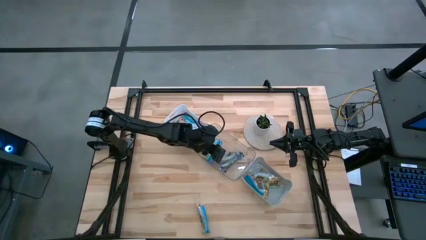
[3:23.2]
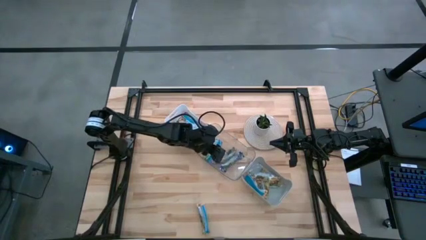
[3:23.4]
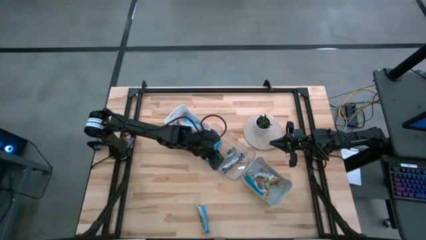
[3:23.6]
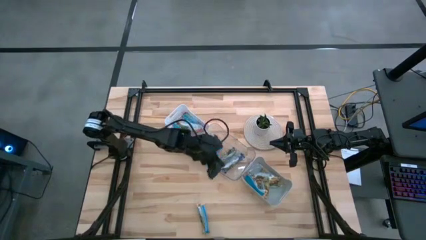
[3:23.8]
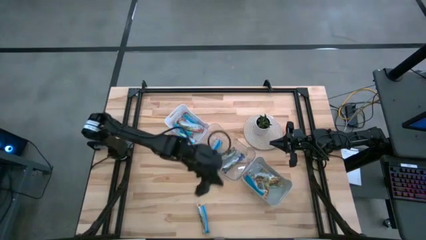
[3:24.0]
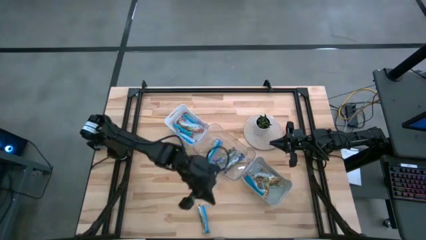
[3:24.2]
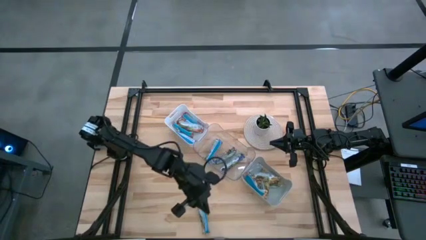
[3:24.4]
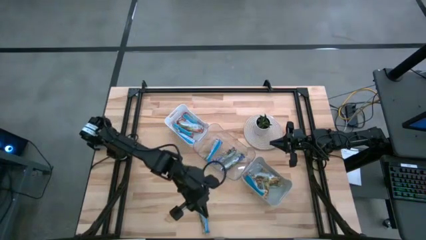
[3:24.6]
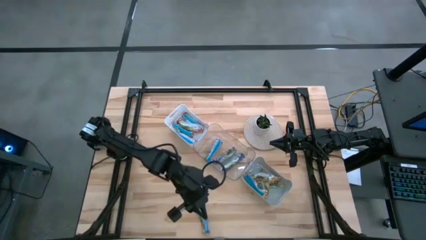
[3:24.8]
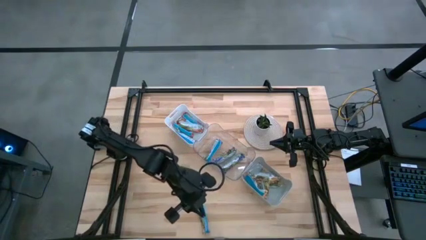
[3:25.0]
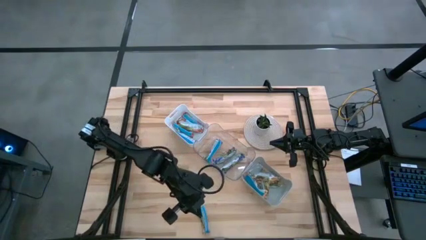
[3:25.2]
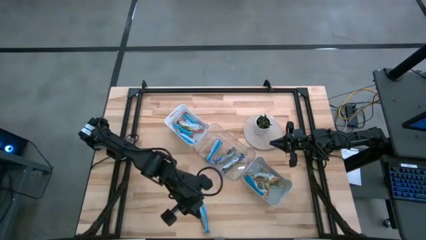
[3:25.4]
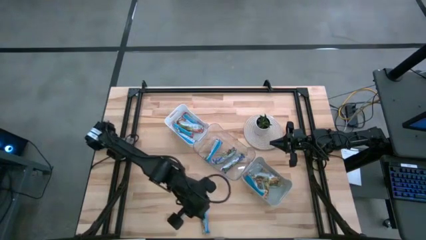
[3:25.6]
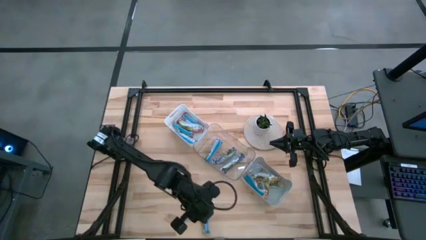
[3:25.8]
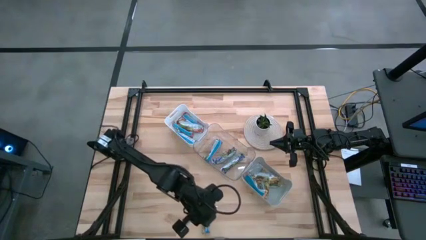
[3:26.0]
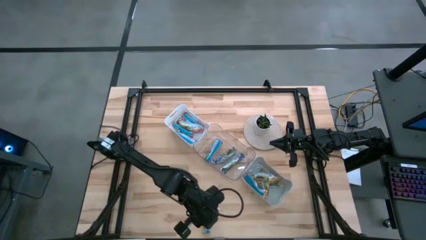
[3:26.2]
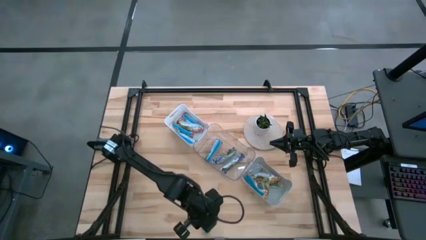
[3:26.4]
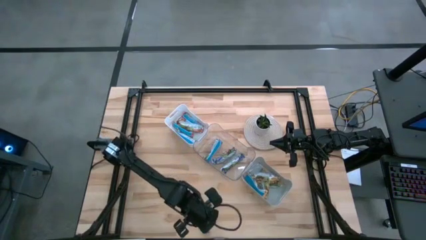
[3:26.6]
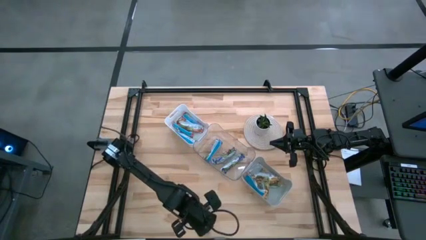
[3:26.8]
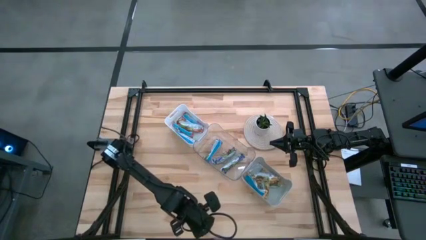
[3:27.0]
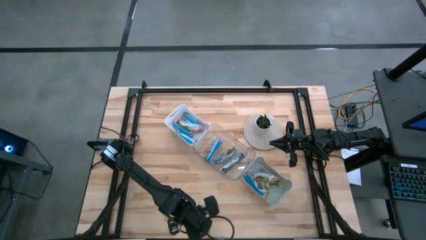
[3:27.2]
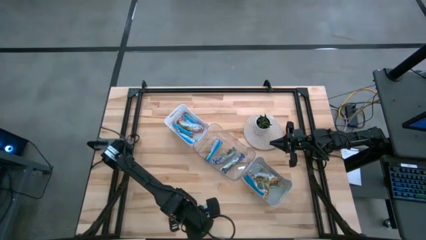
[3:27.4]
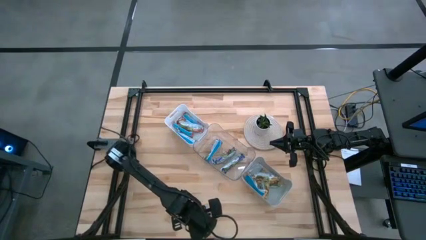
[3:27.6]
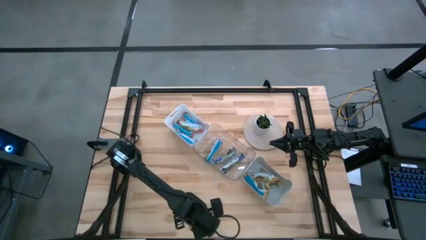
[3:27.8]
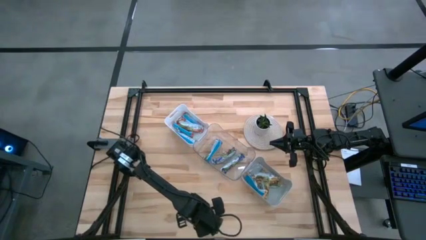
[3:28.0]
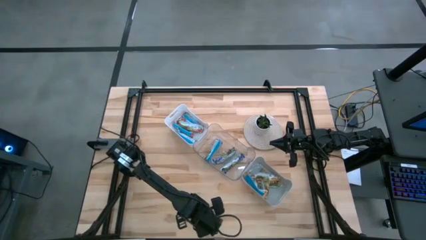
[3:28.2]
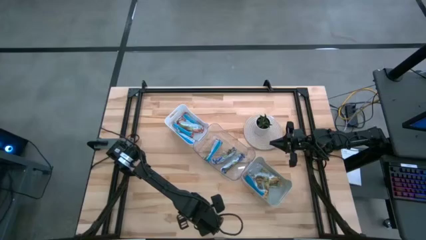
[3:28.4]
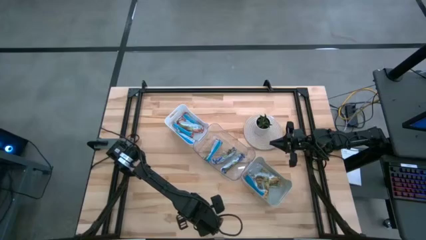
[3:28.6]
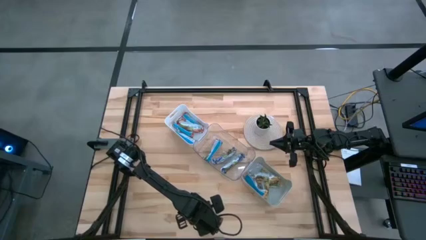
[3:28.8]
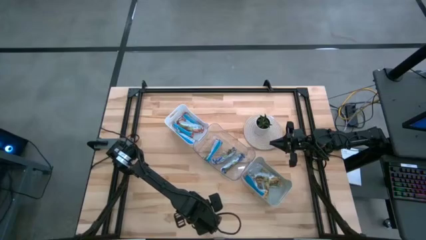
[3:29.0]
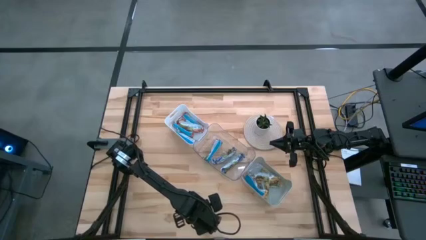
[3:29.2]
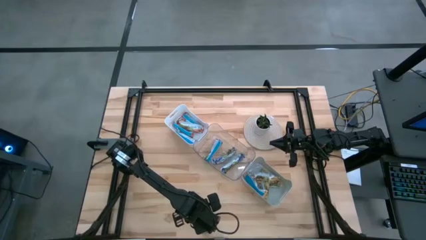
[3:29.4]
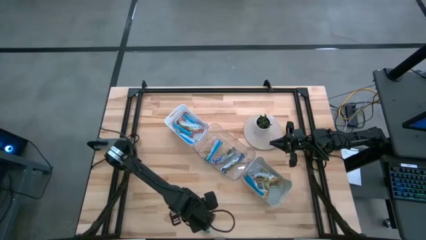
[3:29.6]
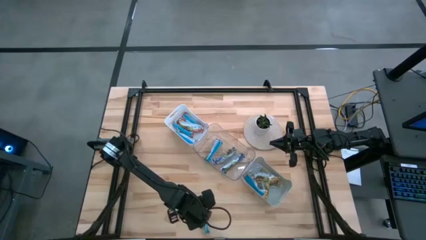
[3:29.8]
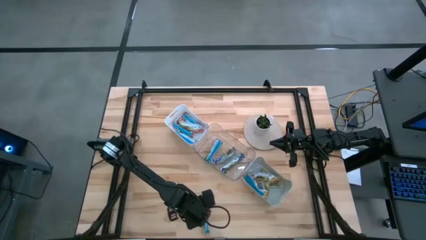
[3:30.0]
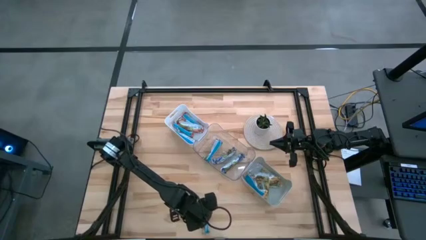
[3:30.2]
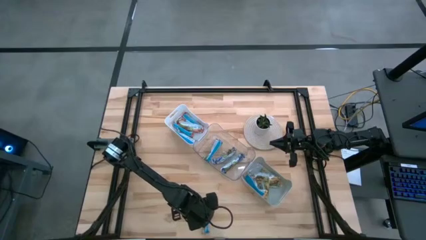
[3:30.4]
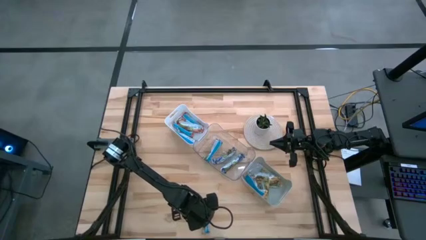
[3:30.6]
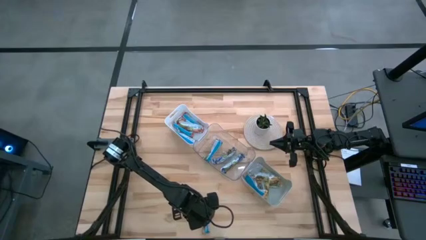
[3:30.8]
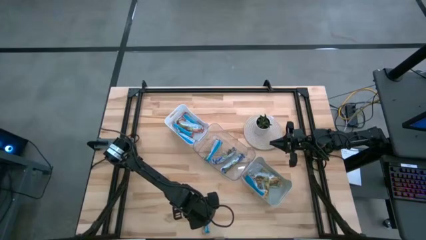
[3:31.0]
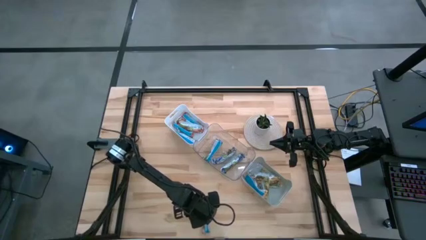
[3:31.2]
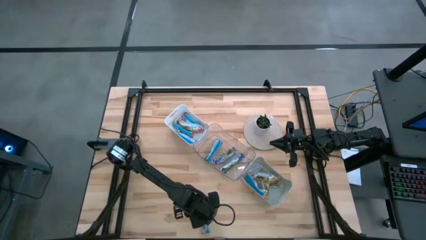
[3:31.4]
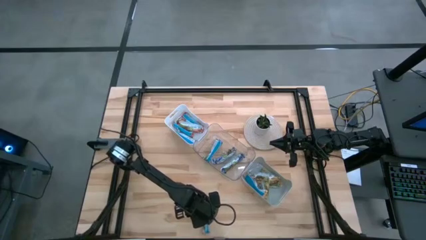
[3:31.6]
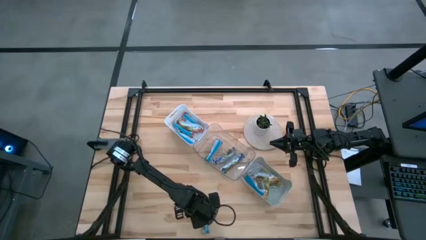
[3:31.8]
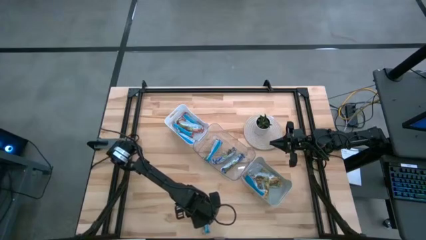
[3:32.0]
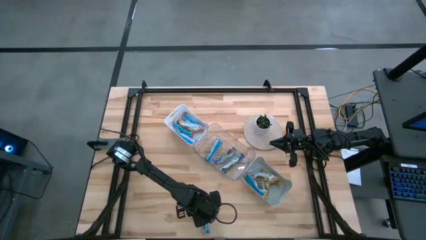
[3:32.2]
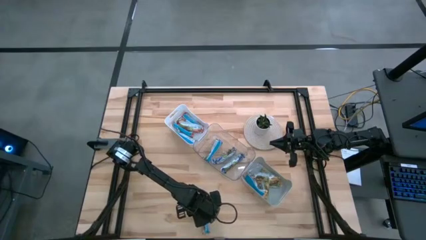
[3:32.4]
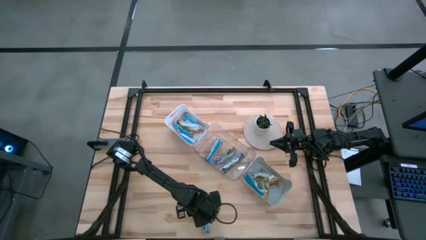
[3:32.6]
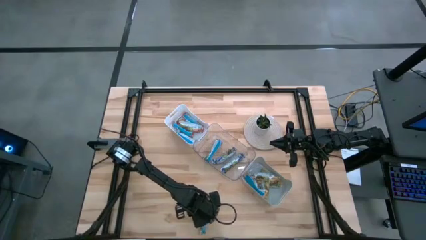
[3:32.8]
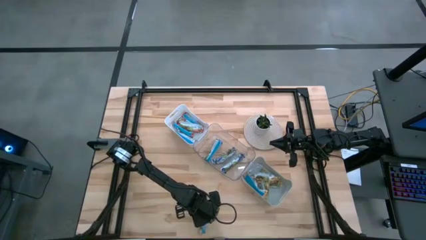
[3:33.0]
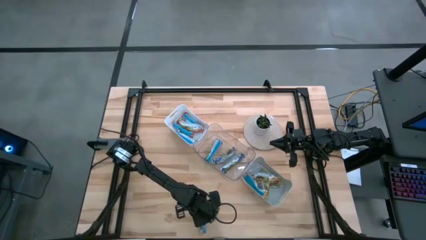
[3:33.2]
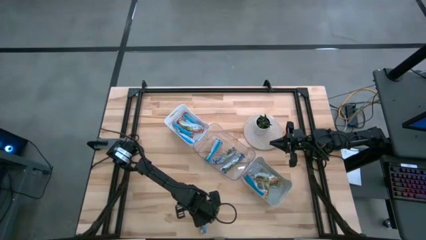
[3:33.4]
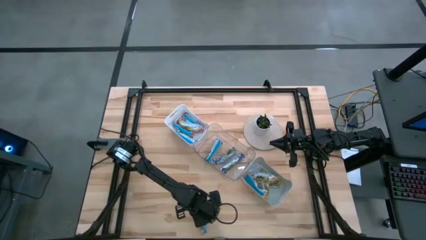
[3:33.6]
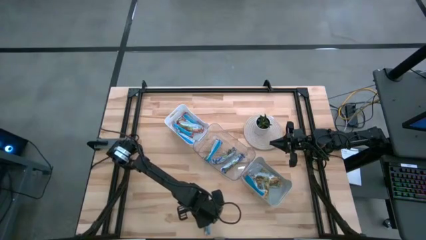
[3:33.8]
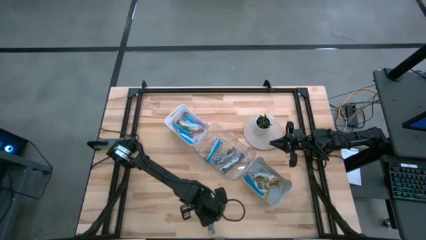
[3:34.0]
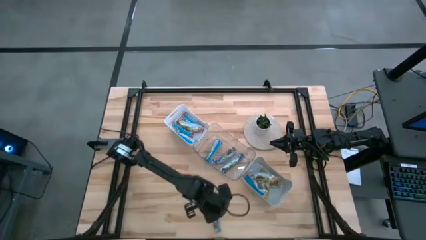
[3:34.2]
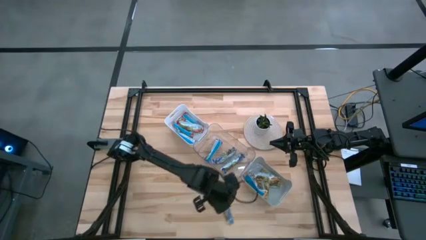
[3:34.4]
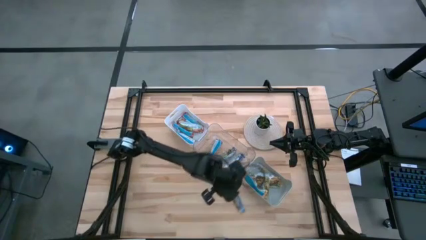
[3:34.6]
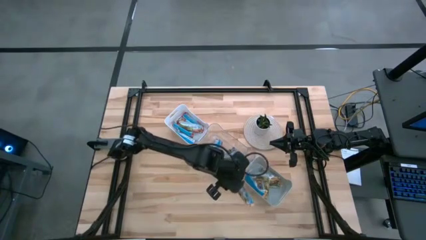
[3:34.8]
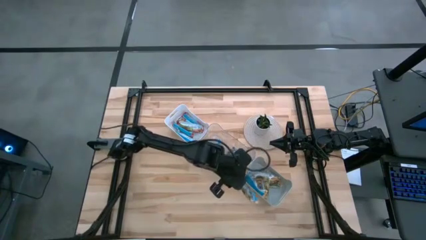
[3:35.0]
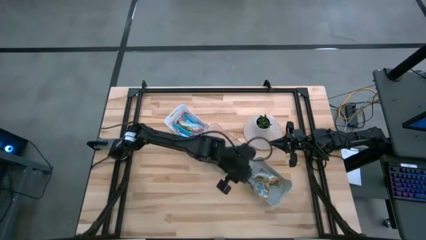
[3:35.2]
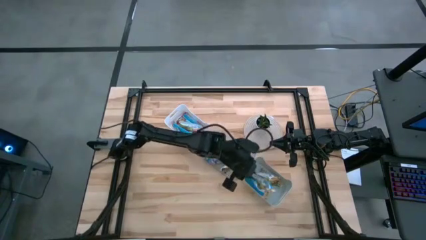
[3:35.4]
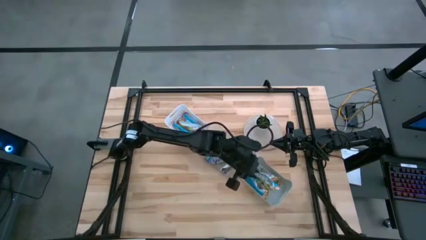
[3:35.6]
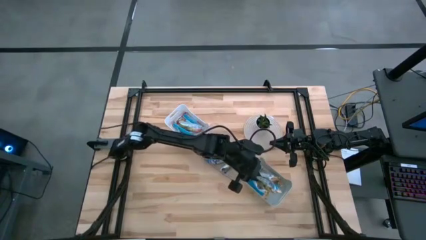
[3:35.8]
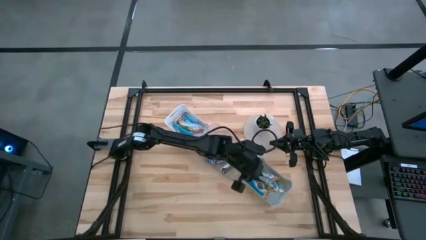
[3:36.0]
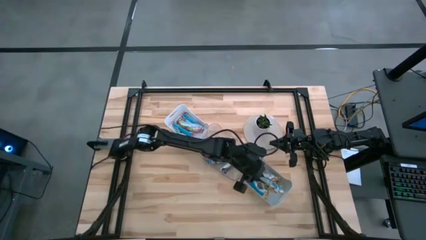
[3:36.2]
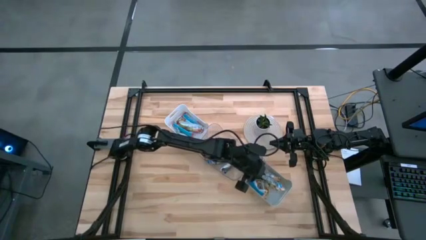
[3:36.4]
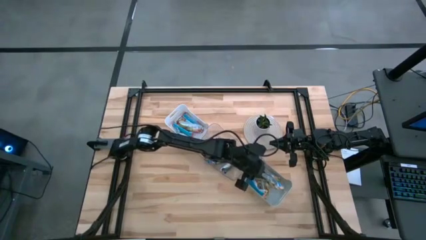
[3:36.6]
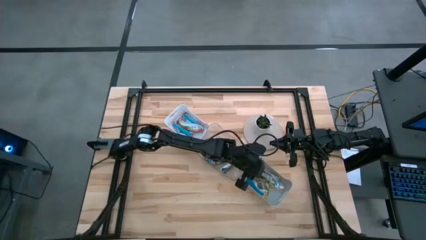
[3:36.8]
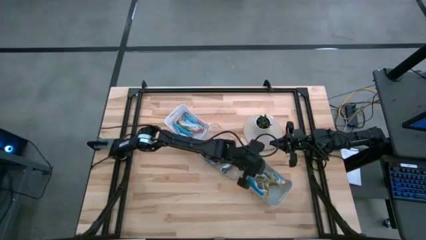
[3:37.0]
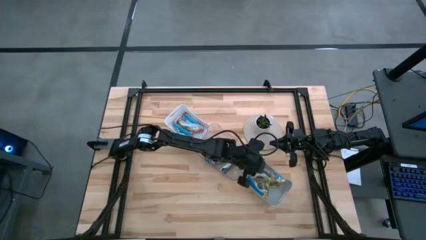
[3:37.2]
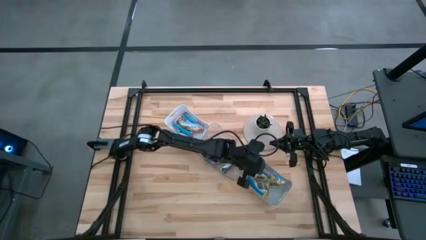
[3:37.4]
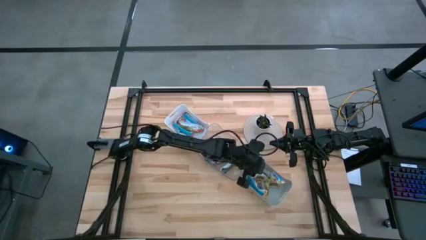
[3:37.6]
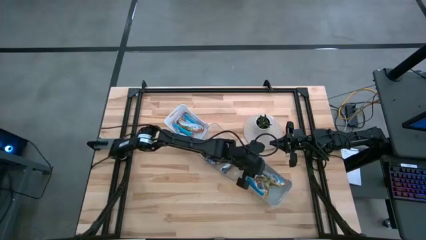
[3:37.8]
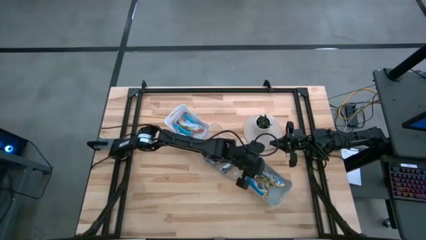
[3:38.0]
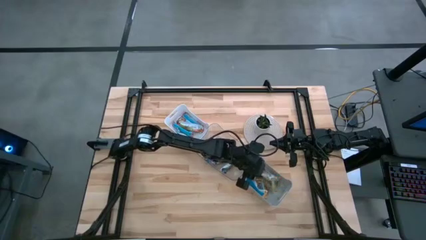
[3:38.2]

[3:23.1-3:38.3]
Task: Pick and place Granola Bars by type
Put the orange granola bar into the gray bin
